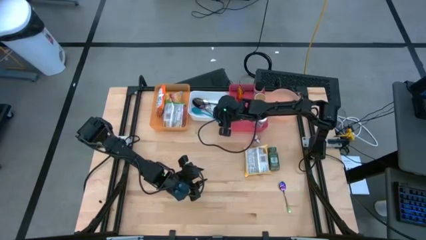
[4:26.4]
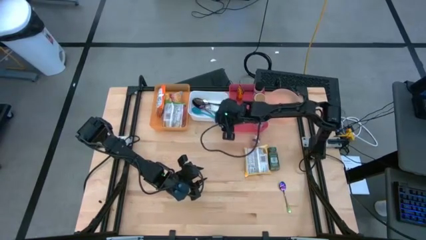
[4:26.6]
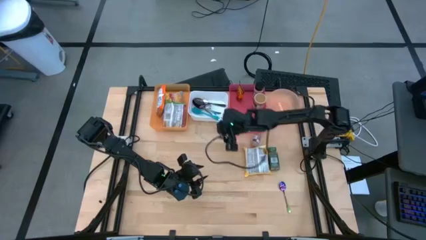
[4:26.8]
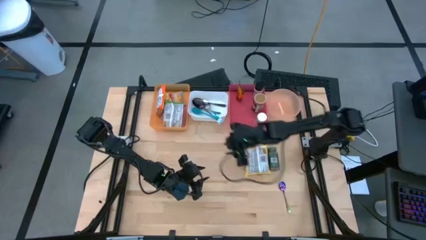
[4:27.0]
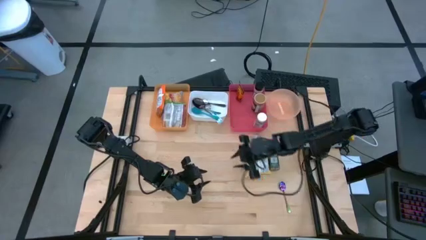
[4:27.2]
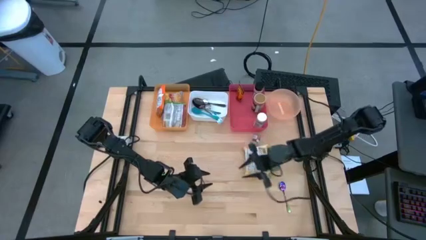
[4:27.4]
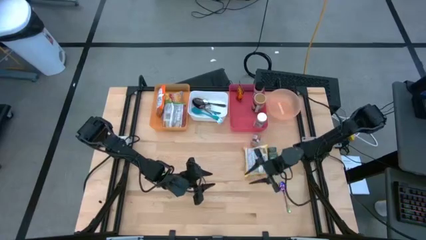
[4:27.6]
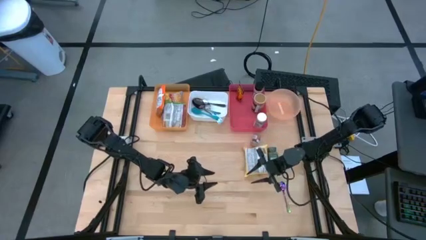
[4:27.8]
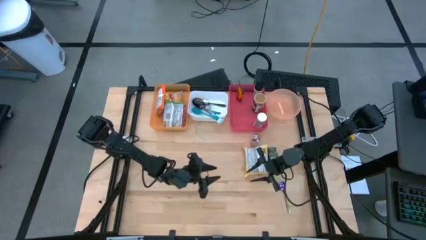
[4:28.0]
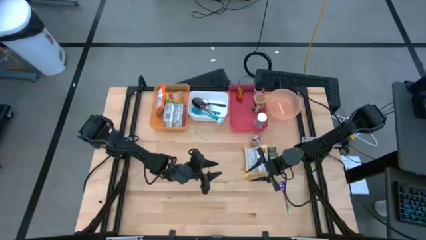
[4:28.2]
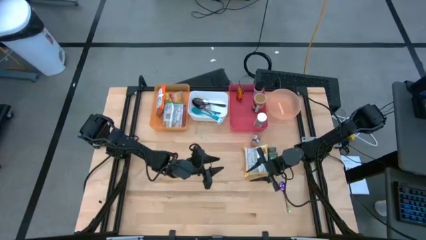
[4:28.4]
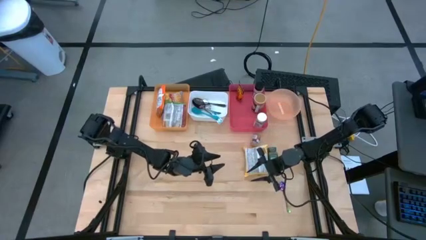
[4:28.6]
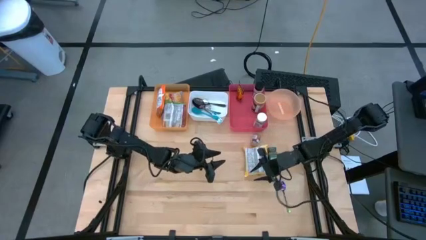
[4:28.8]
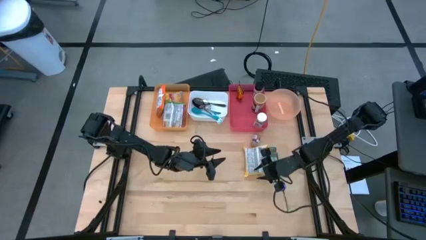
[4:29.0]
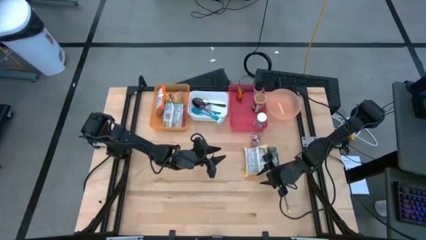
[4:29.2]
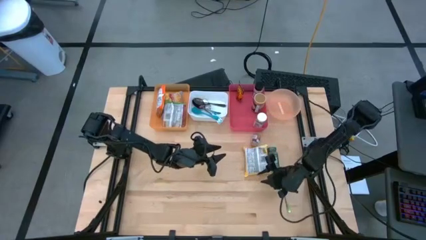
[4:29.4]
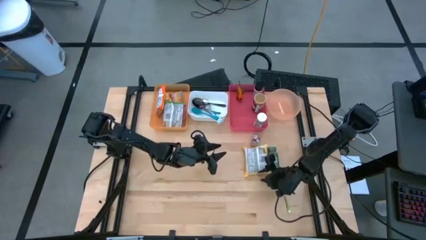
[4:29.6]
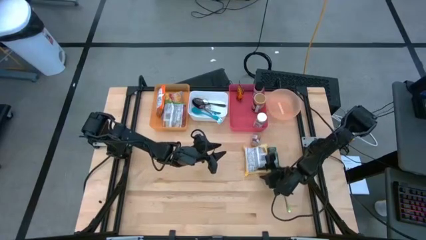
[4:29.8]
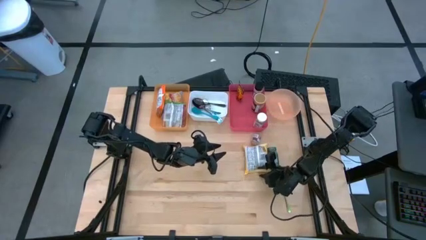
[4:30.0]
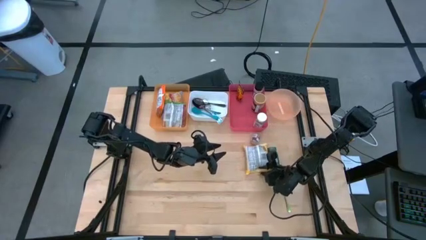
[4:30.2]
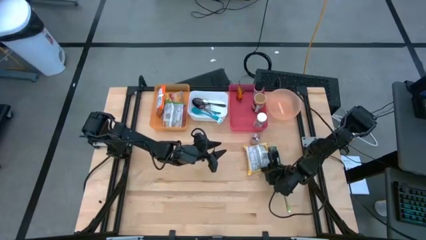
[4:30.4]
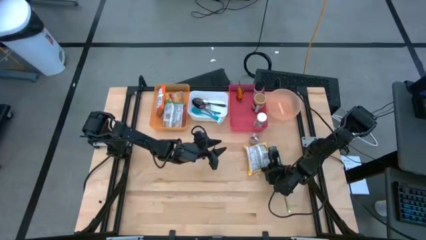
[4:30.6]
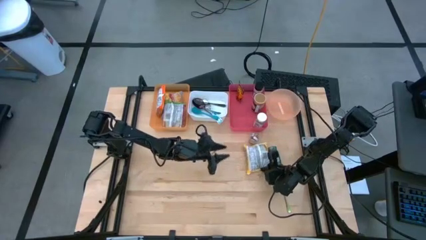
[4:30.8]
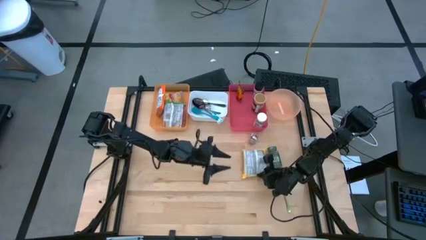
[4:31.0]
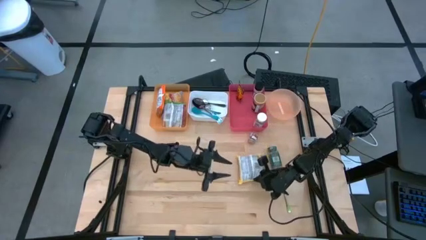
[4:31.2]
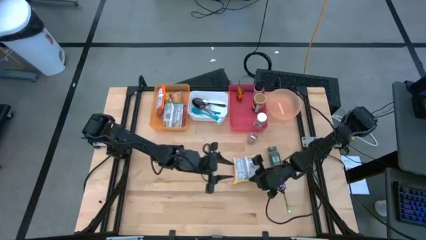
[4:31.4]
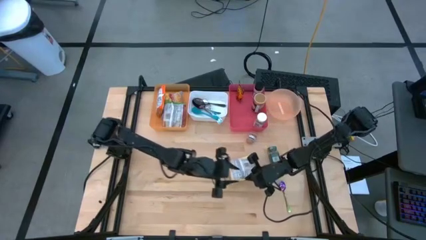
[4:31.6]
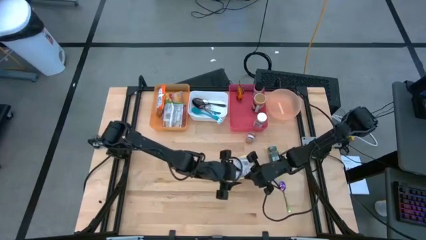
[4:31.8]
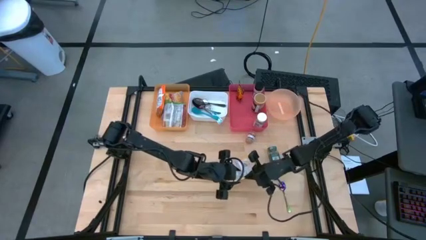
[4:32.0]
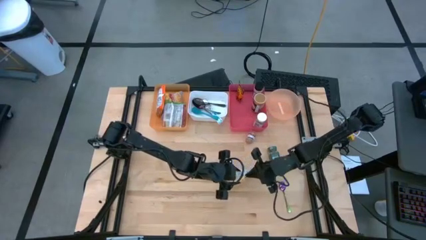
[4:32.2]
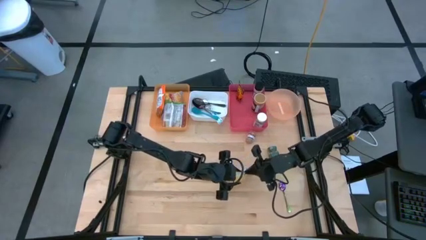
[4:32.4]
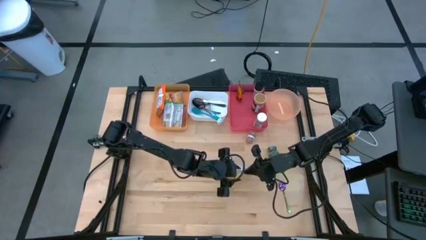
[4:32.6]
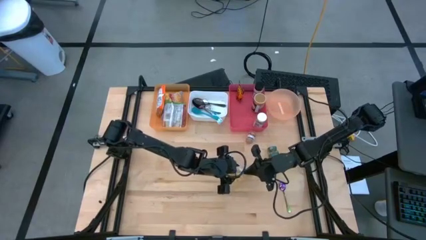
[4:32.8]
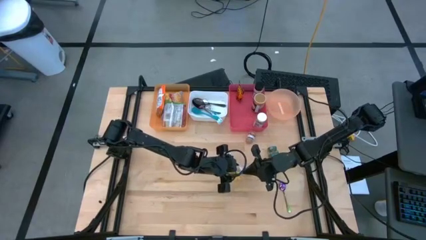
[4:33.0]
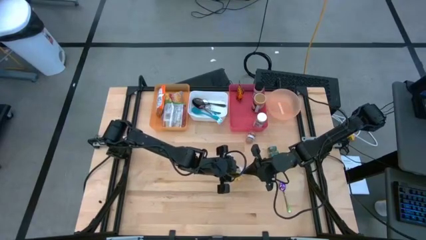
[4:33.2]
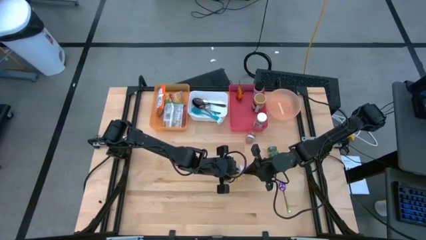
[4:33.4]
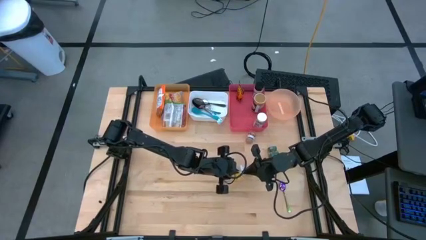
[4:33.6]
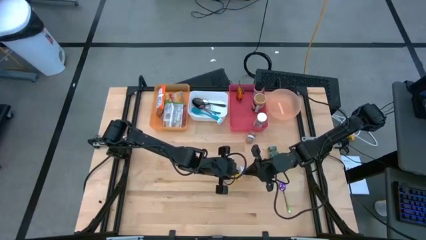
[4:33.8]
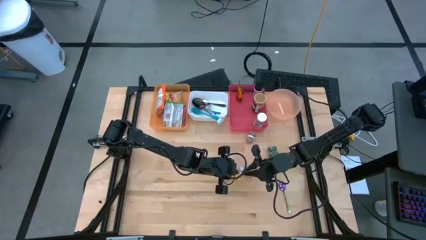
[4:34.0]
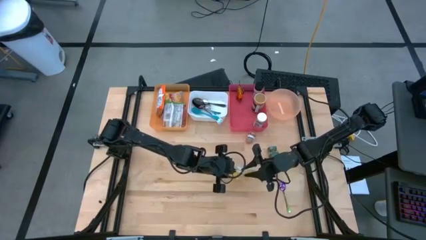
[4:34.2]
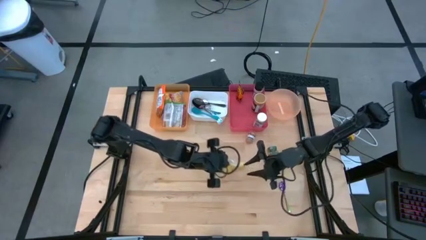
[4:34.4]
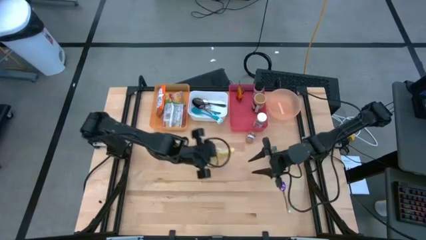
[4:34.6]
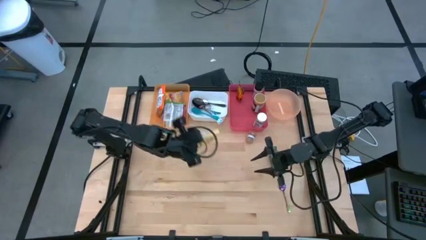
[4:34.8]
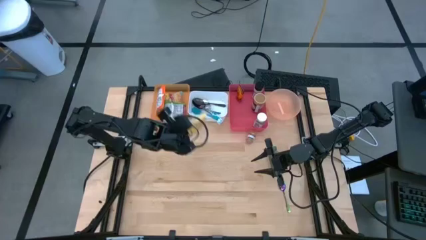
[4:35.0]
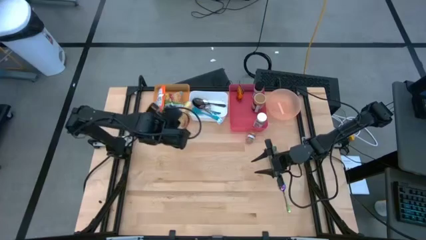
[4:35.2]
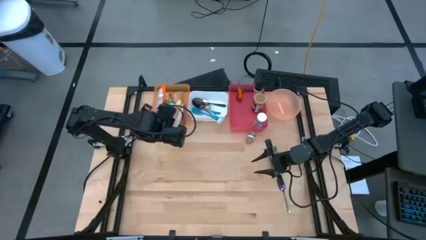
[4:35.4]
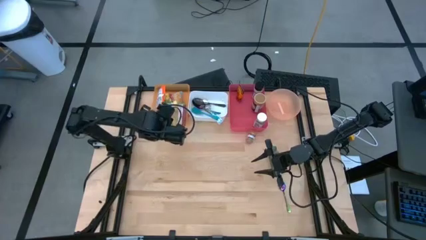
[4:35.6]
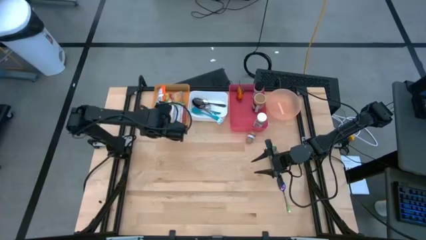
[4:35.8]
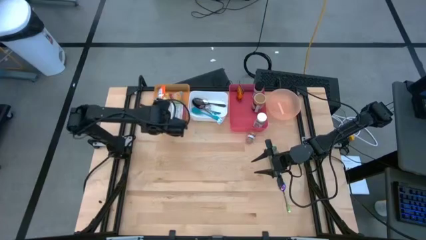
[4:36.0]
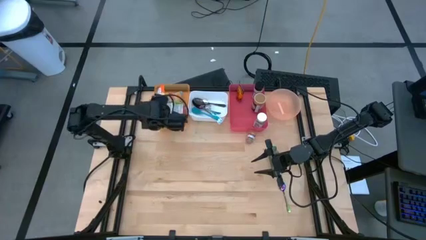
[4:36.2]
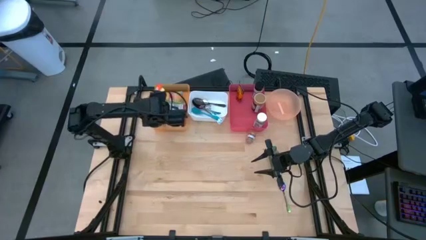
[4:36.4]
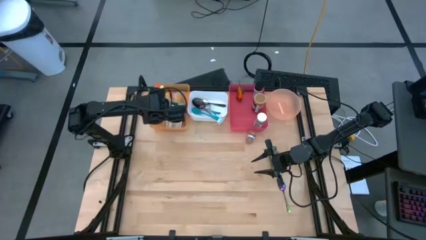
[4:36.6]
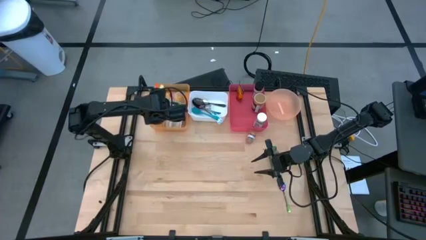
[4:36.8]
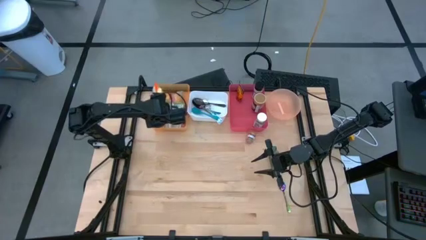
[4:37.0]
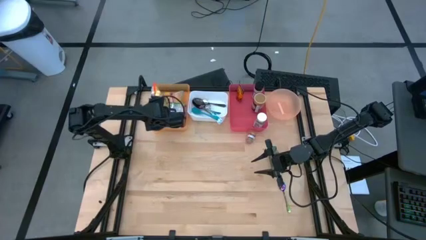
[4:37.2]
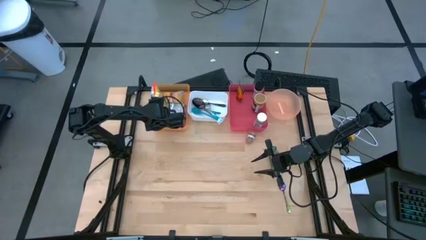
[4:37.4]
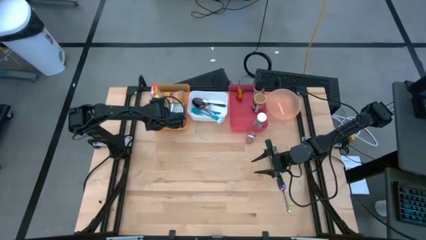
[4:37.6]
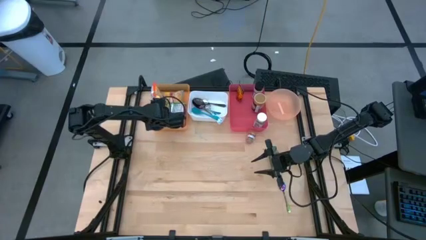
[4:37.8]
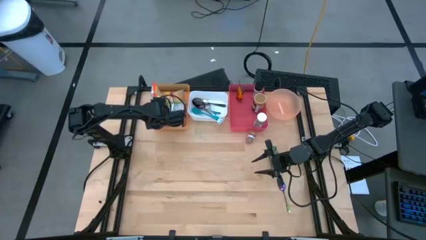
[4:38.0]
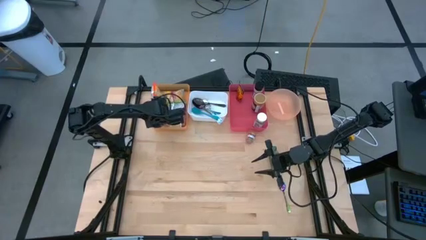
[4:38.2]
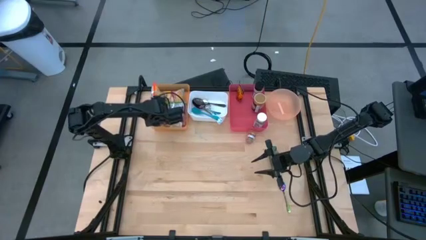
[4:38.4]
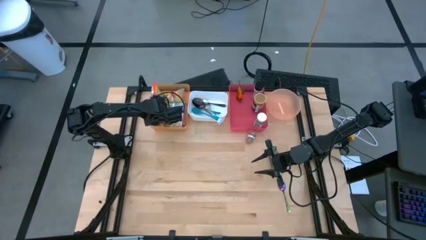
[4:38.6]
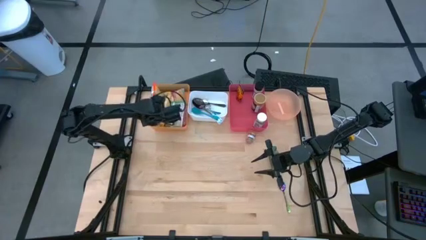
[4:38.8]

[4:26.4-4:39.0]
Task: Pick & Place Food Item
Put the yellow noodle pack into the orange bin
